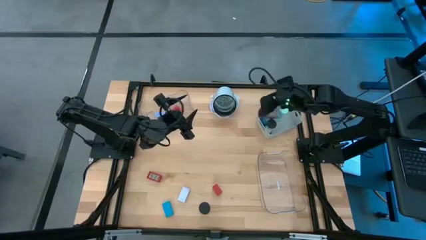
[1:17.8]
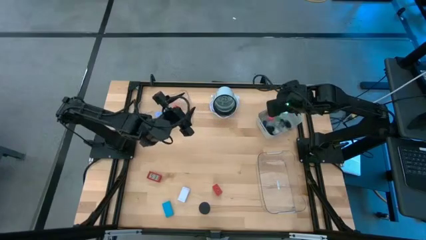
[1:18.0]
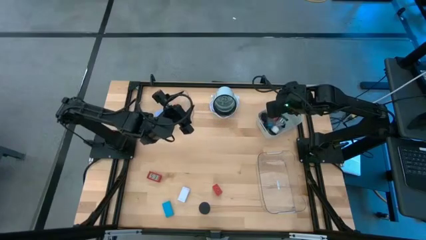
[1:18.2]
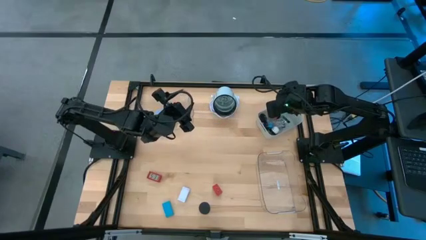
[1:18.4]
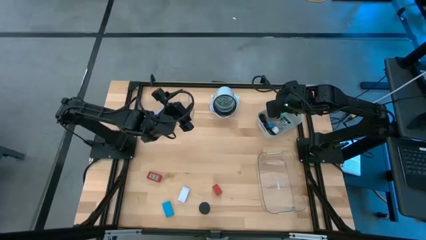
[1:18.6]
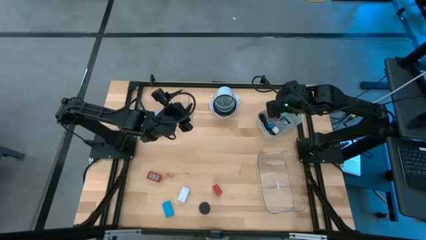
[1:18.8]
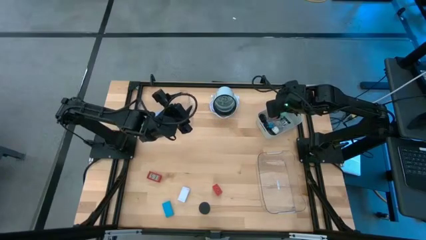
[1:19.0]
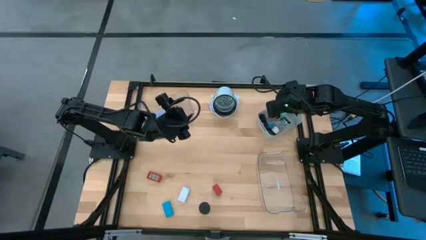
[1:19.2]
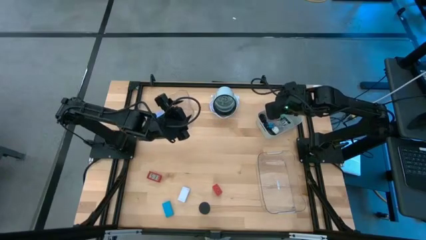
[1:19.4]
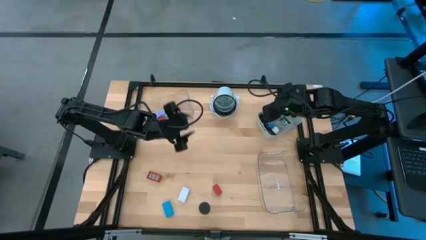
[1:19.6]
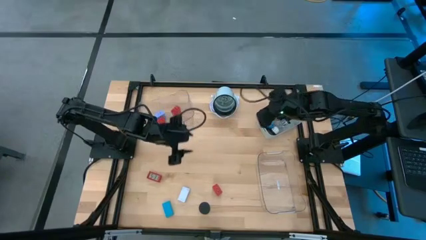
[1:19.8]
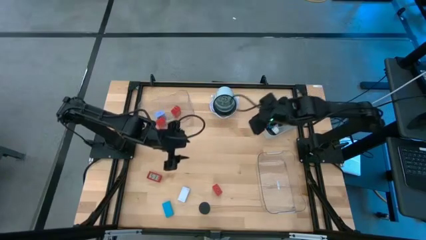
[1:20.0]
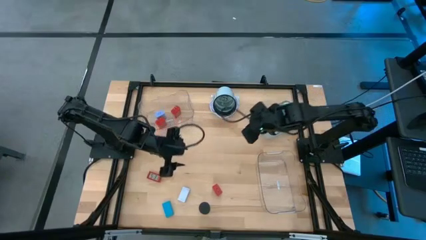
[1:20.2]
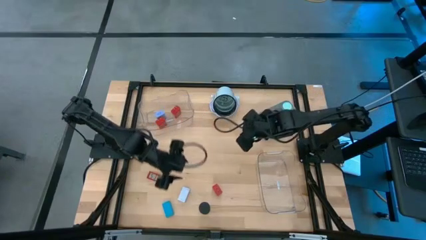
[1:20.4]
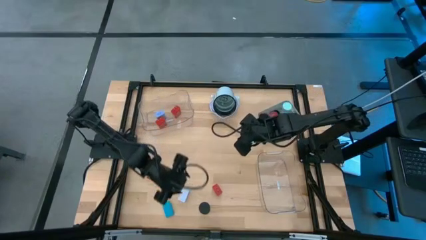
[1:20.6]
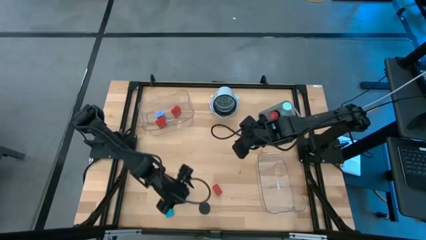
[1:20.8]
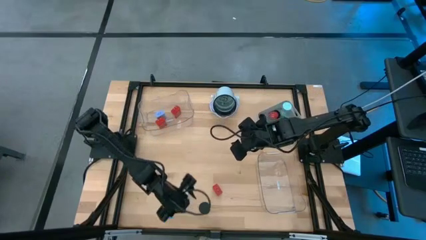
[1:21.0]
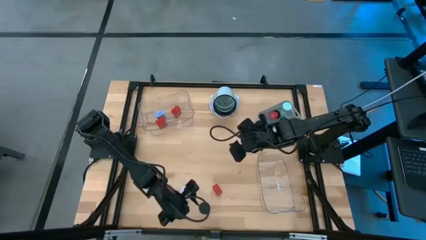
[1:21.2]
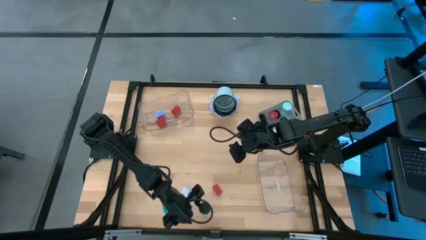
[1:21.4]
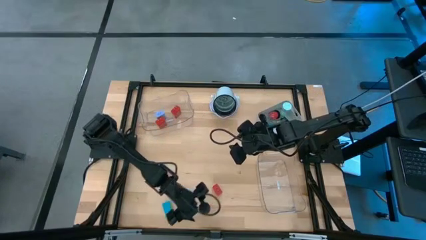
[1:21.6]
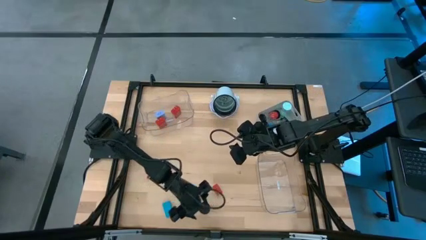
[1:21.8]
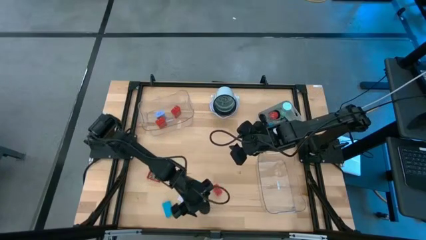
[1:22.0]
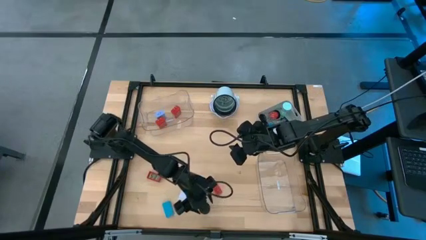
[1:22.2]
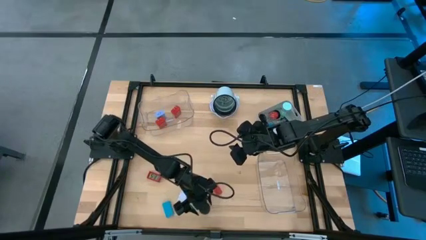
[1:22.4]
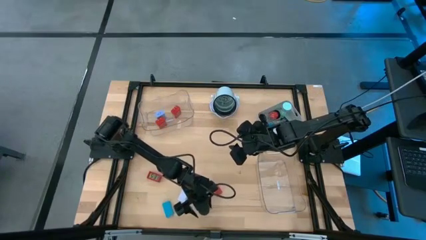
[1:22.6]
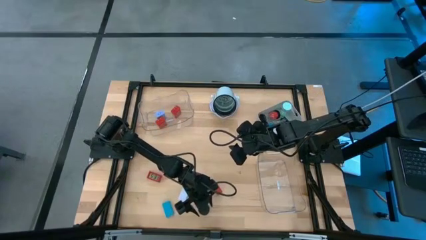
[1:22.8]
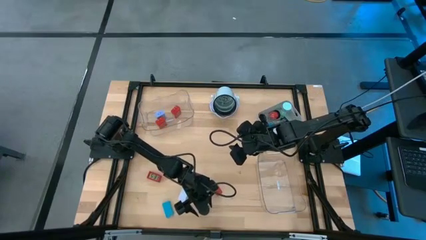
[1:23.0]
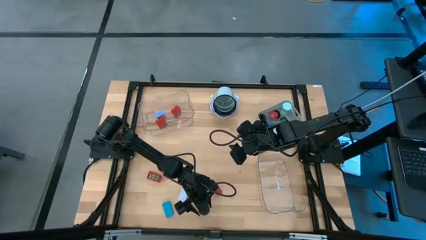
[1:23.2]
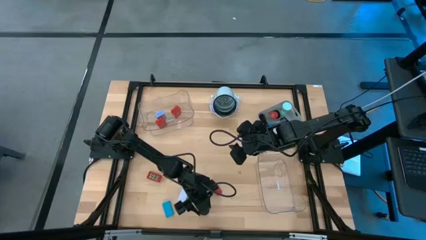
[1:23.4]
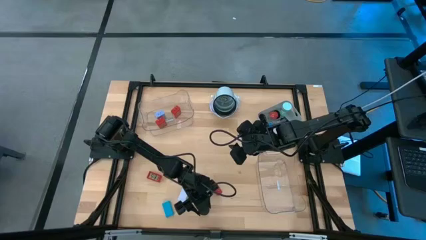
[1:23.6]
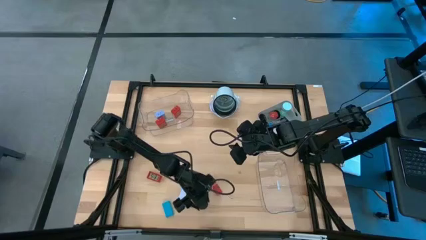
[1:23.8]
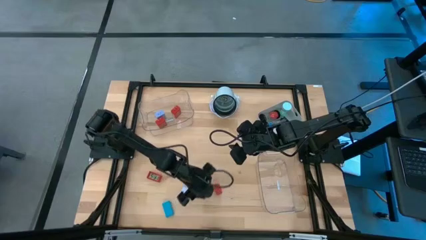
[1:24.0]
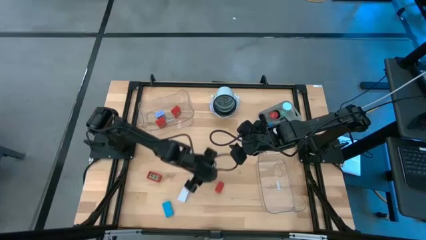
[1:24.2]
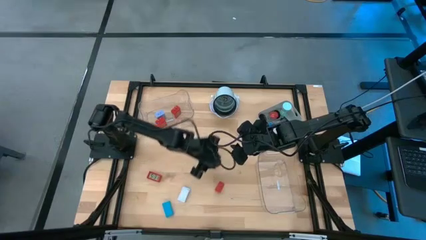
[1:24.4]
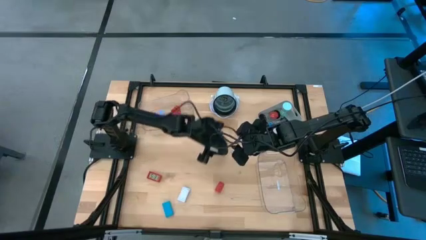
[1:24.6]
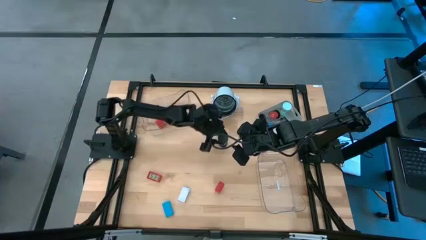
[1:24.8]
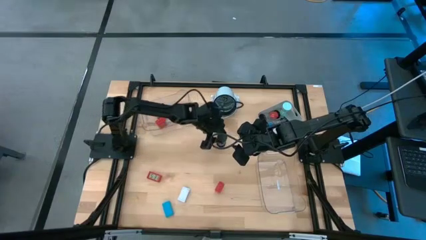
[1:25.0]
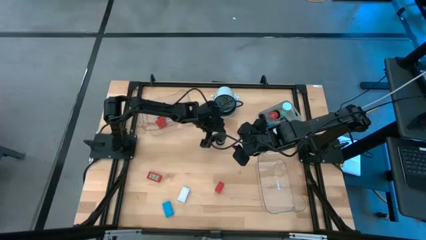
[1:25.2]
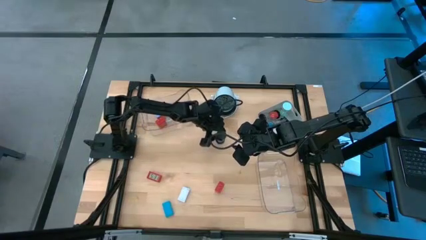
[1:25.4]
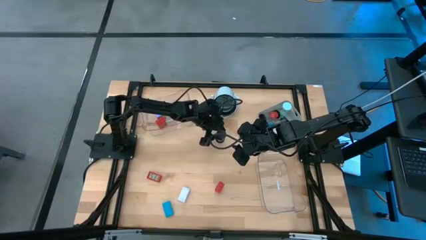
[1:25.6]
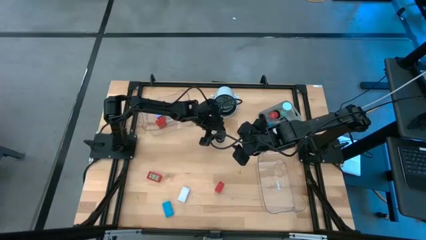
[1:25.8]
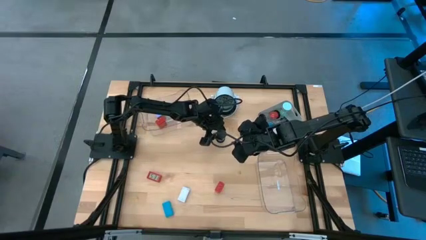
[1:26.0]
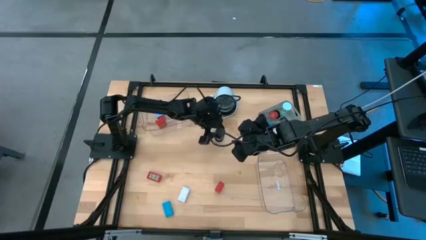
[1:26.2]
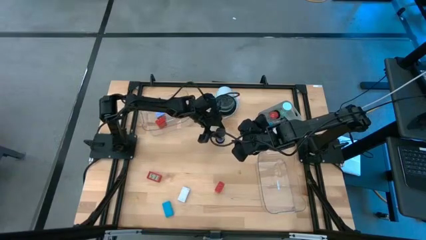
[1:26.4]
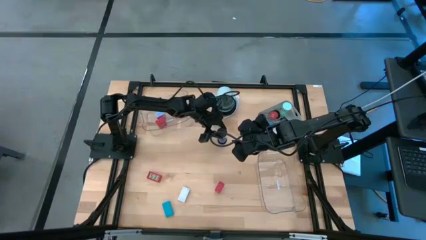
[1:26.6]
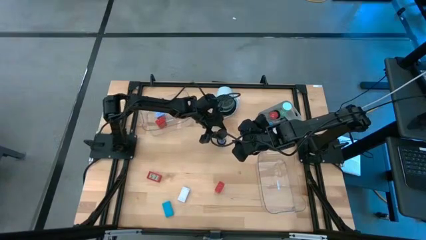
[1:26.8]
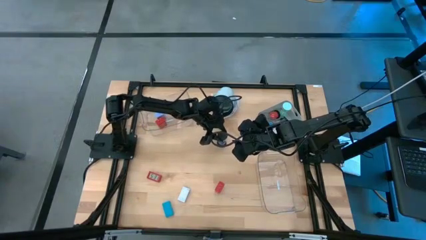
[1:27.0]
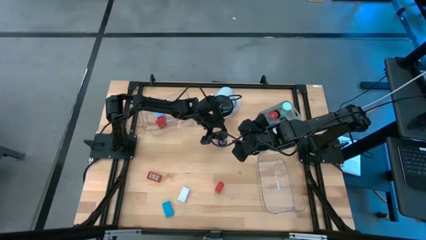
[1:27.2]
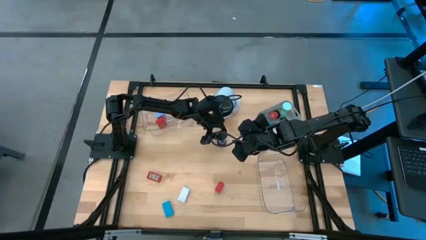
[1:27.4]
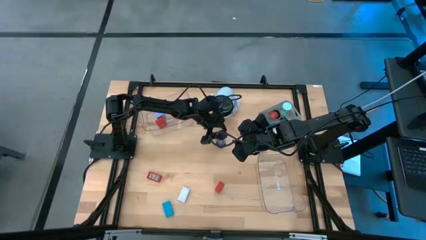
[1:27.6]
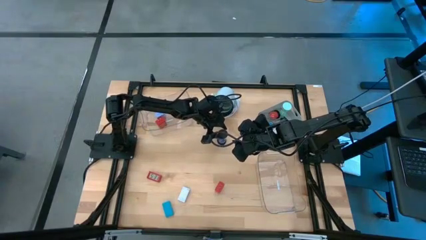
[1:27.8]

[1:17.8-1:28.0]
Task: Pick & Place Office items
Move the blue hourglass to the top middle of the table

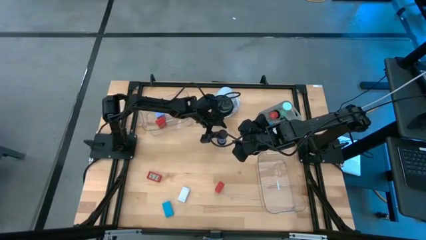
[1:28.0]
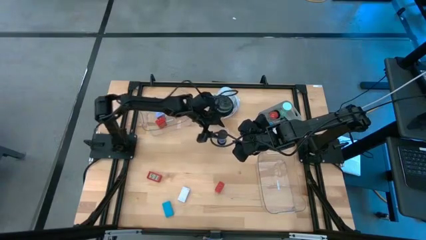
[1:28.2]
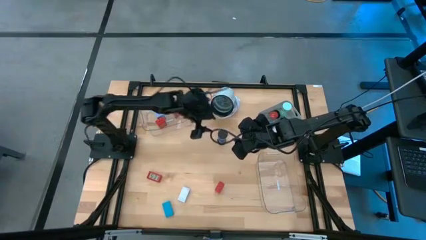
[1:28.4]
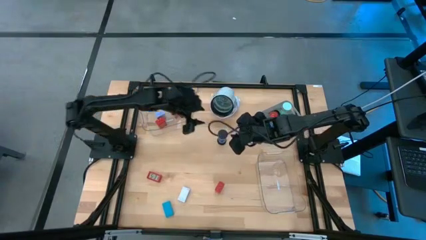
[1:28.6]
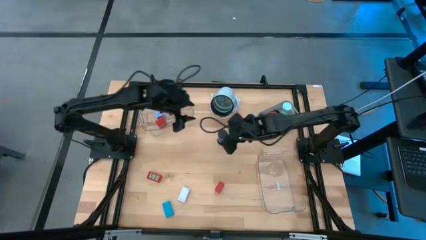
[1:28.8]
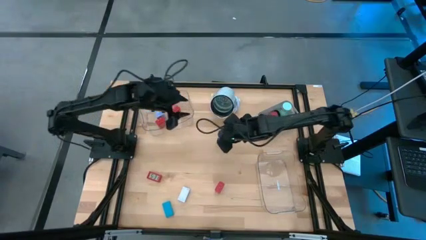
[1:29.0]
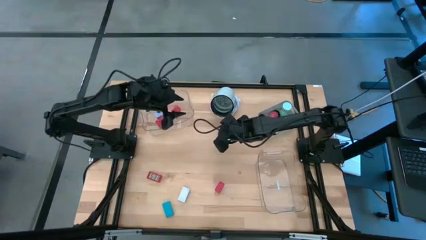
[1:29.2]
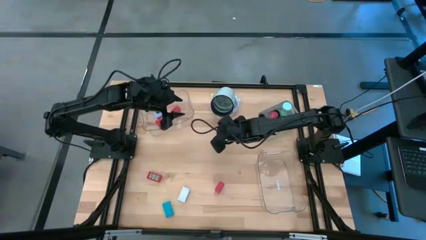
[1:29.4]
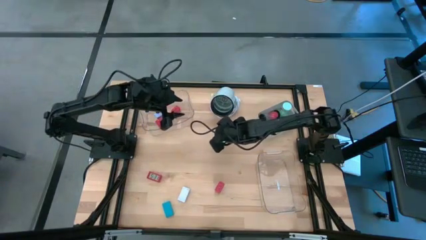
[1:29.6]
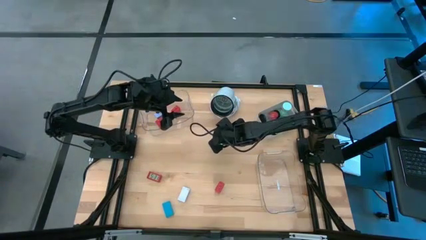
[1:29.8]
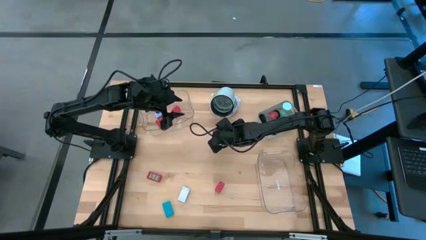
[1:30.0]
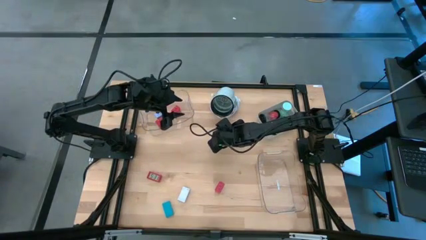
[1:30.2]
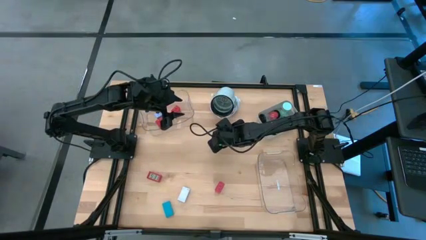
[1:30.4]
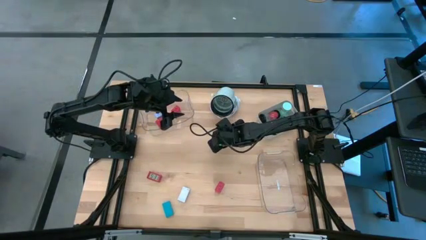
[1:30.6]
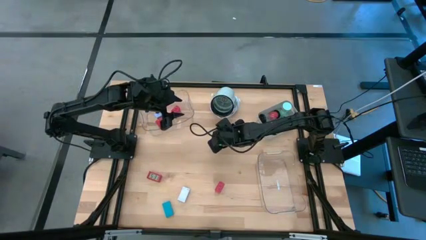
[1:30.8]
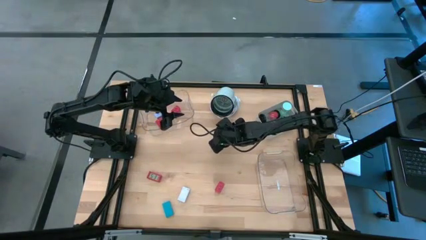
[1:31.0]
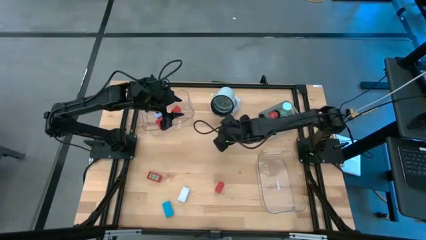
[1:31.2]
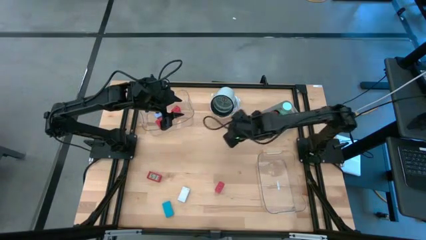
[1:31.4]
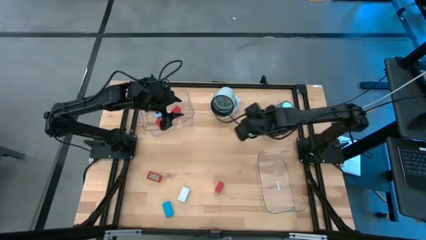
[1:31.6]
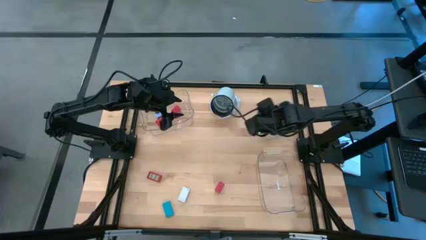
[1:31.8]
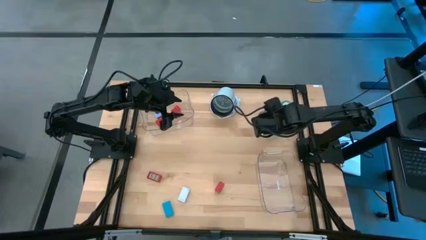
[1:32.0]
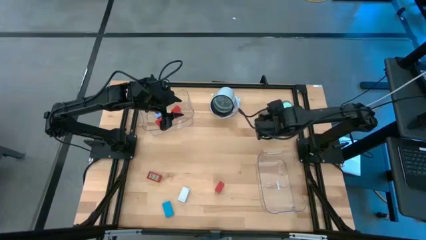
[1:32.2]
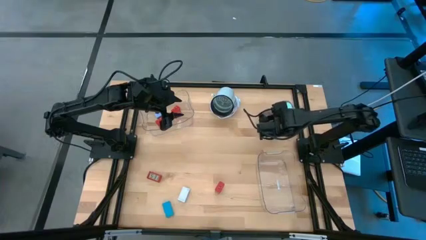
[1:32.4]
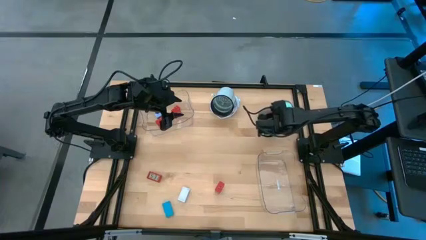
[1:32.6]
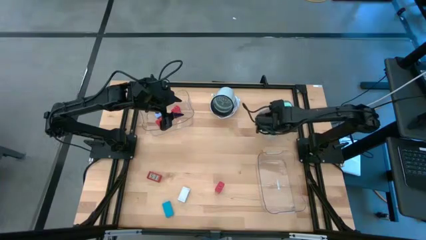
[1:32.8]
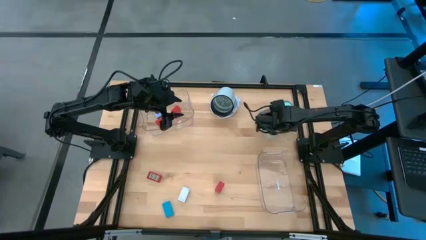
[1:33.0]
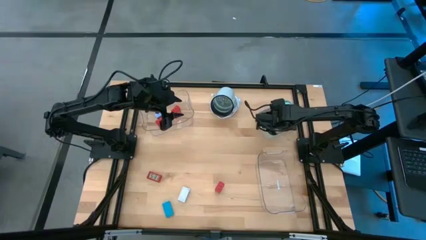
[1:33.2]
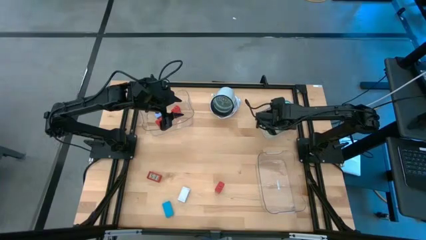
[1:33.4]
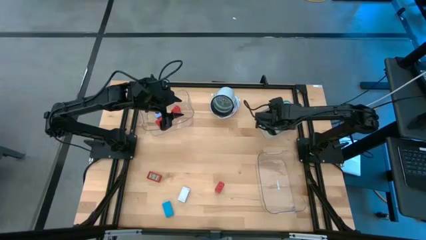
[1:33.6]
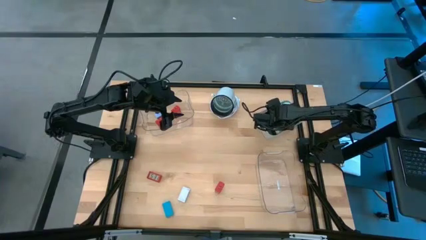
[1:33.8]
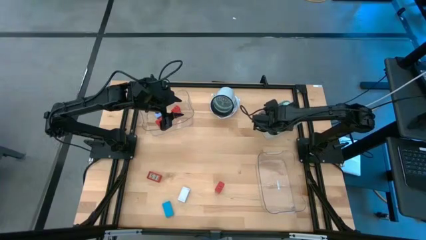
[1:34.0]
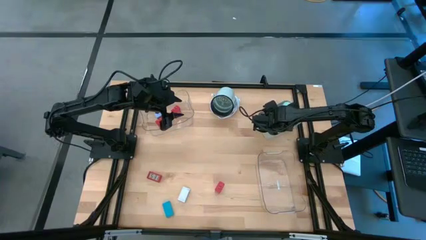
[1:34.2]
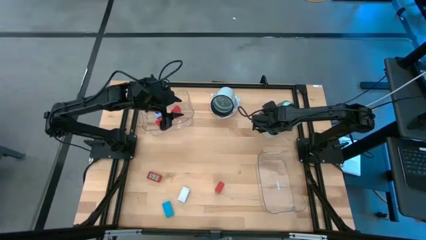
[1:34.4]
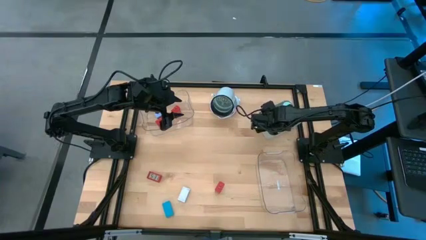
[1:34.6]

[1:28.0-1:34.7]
Put the black hourglass into the gray bin

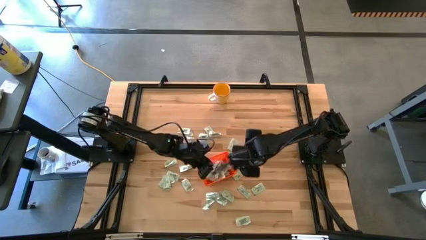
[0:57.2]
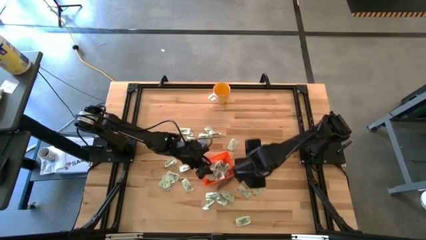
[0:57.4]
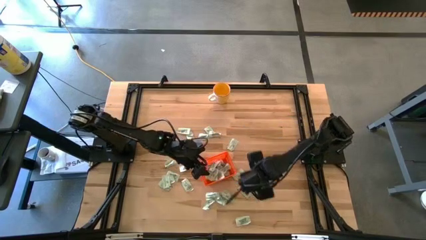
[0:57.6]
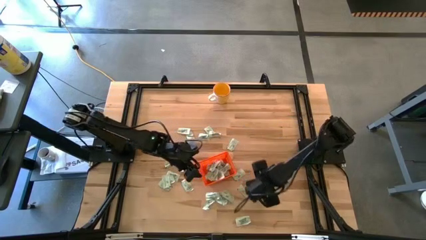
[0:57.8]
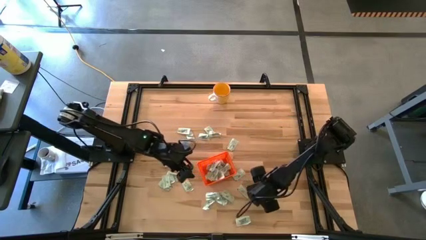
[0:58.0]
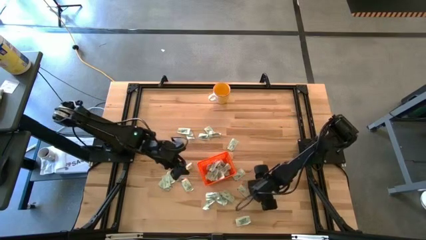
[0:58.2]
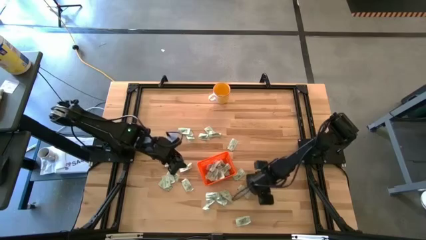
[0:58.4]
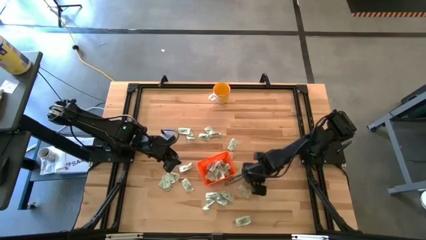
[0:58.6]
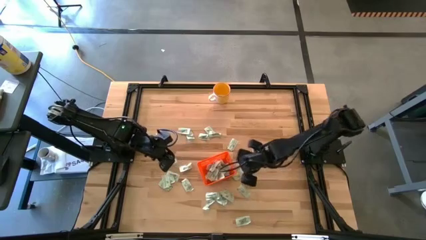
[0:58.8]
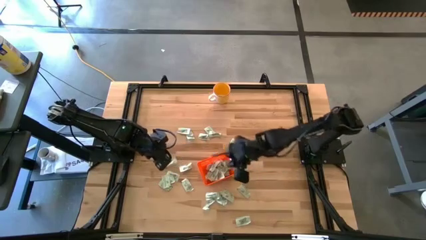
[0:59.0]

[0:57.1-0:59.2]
Task: Pick and place Stevia / Truvia into bins
Put the stevia packet into the bin
